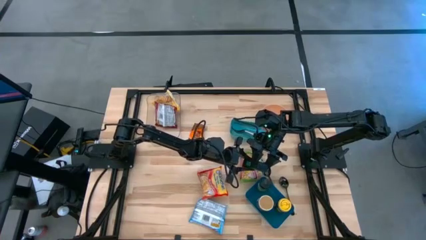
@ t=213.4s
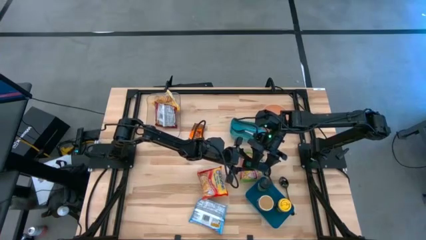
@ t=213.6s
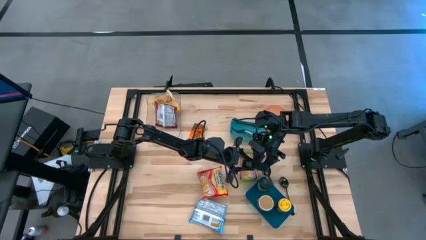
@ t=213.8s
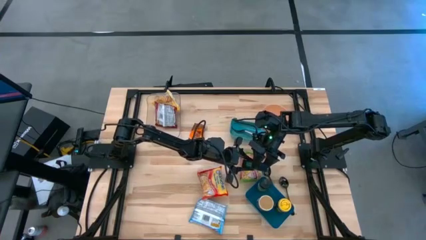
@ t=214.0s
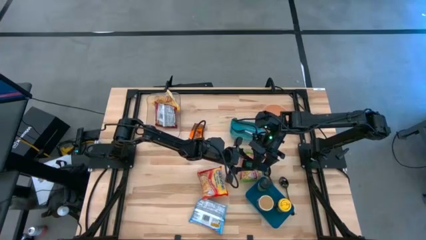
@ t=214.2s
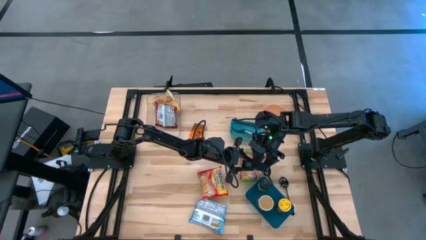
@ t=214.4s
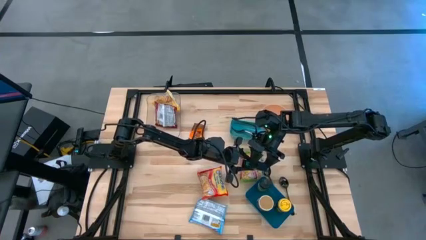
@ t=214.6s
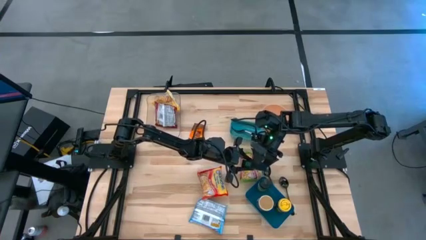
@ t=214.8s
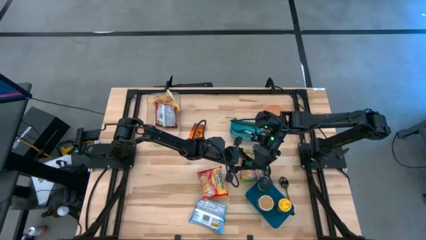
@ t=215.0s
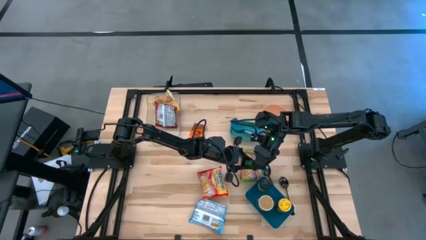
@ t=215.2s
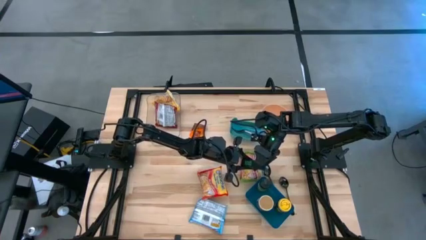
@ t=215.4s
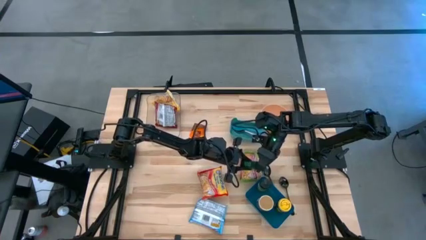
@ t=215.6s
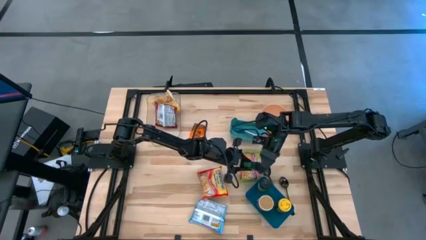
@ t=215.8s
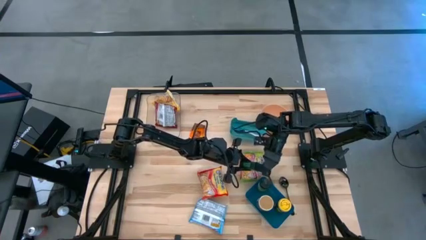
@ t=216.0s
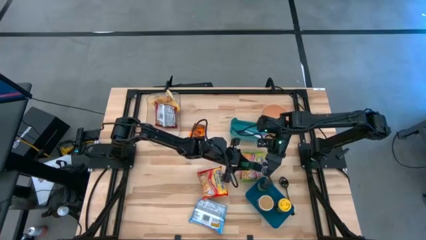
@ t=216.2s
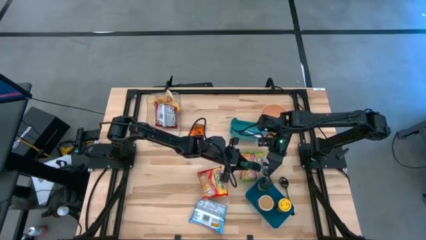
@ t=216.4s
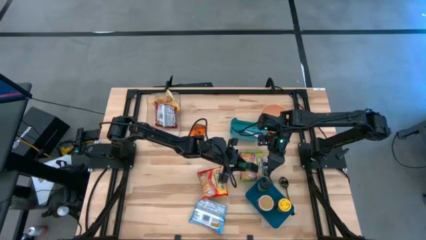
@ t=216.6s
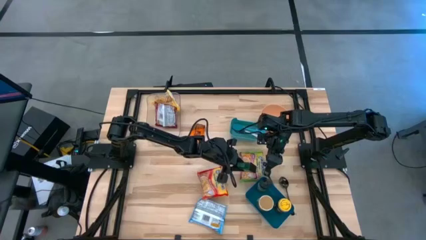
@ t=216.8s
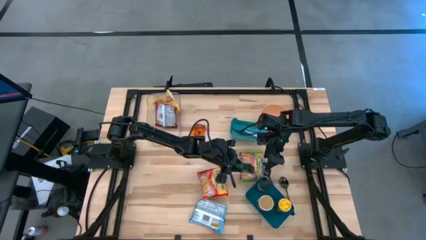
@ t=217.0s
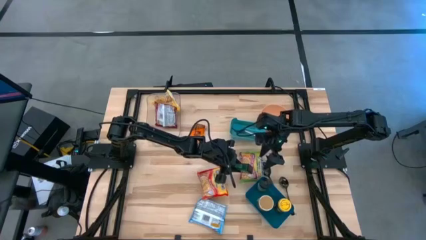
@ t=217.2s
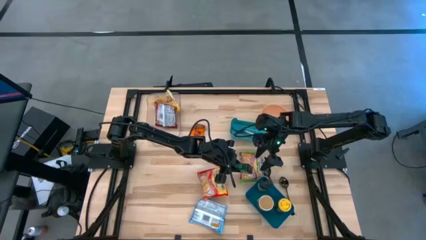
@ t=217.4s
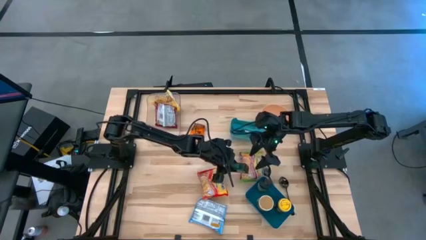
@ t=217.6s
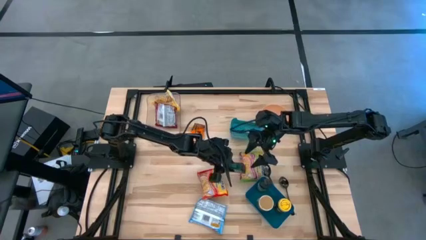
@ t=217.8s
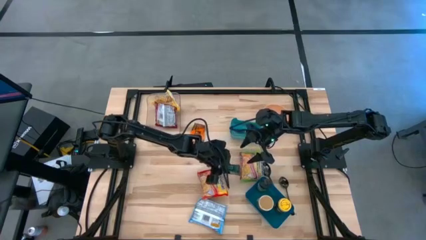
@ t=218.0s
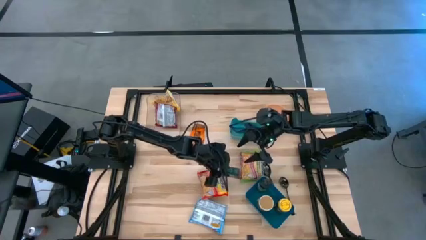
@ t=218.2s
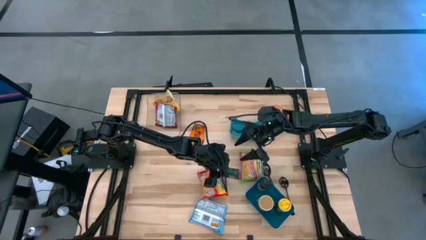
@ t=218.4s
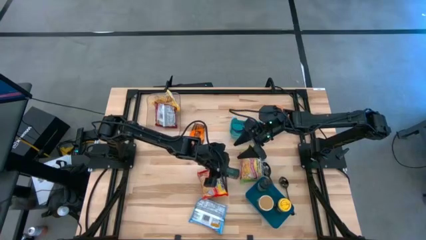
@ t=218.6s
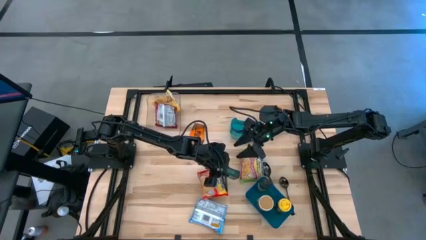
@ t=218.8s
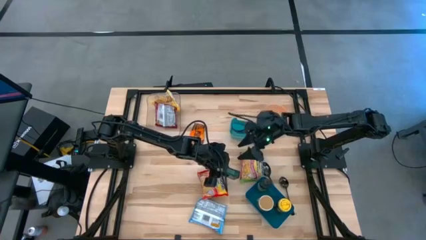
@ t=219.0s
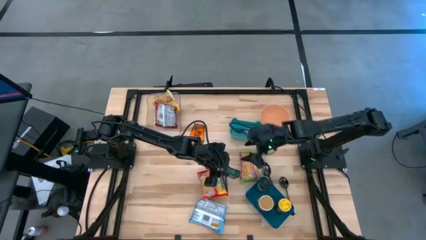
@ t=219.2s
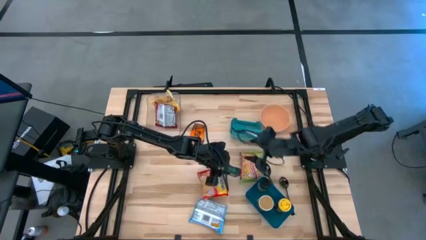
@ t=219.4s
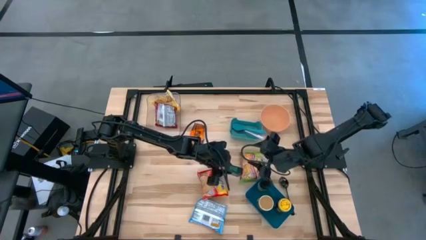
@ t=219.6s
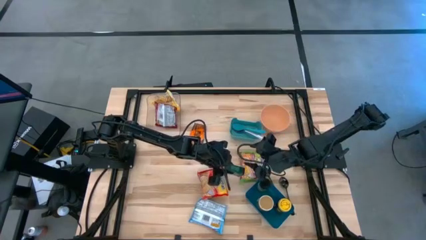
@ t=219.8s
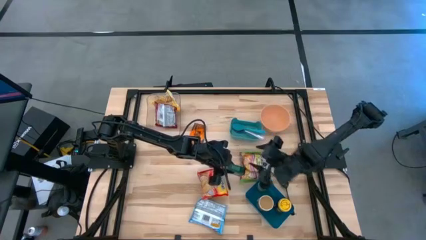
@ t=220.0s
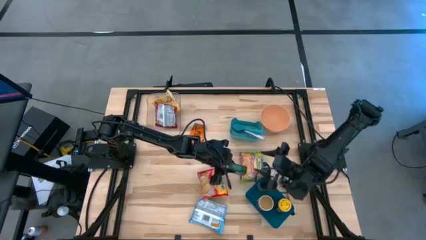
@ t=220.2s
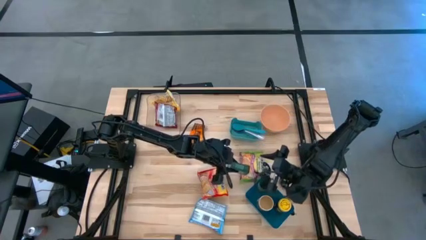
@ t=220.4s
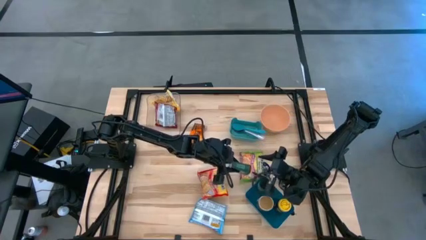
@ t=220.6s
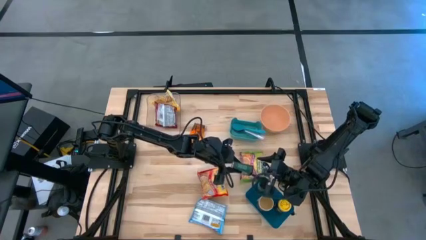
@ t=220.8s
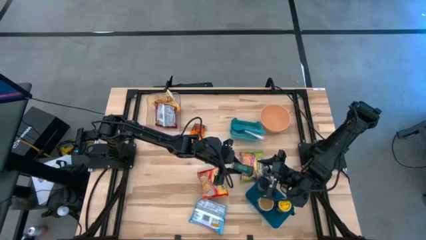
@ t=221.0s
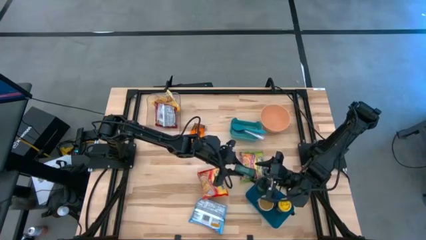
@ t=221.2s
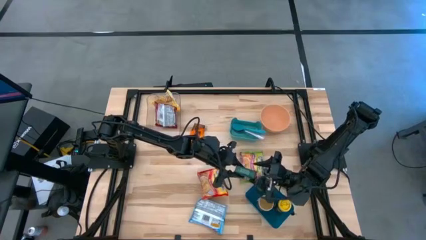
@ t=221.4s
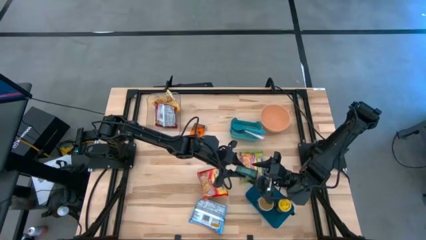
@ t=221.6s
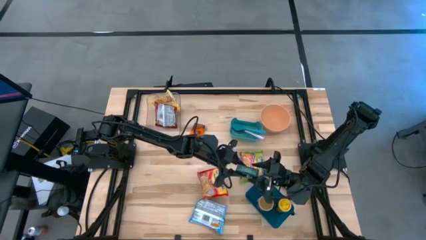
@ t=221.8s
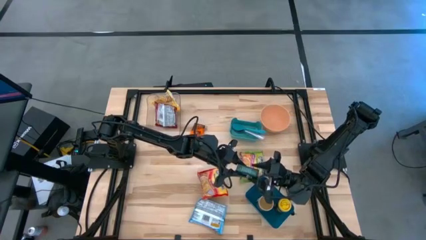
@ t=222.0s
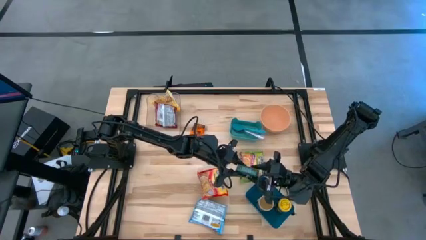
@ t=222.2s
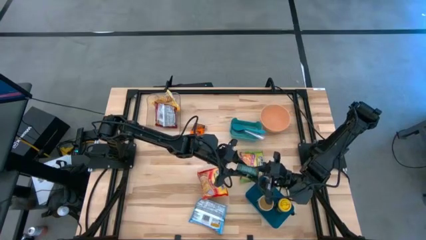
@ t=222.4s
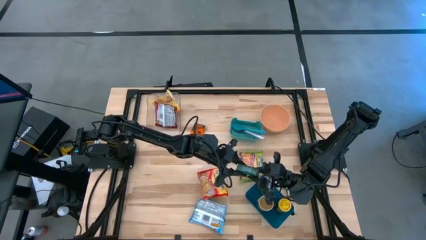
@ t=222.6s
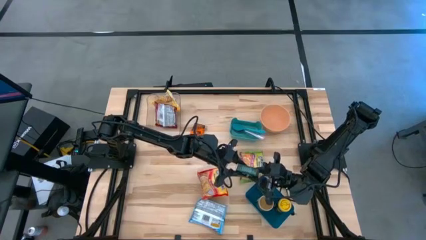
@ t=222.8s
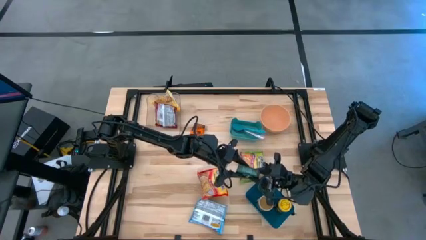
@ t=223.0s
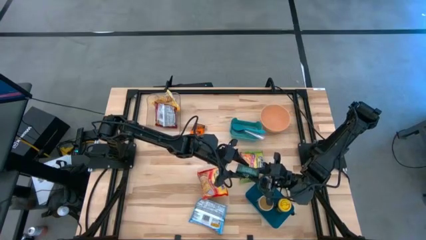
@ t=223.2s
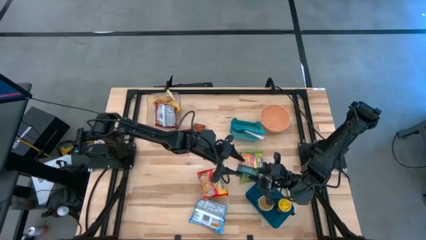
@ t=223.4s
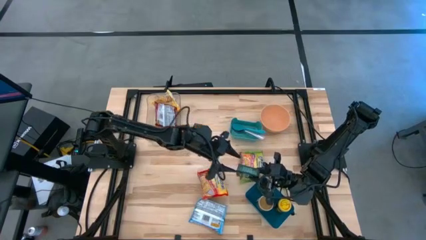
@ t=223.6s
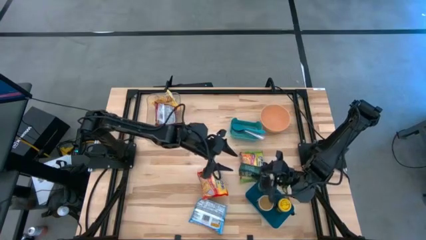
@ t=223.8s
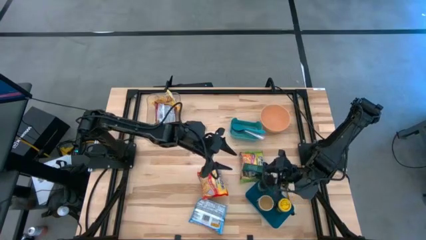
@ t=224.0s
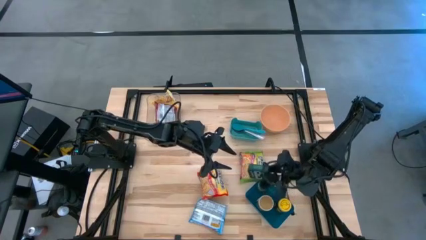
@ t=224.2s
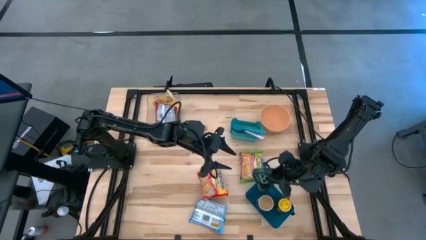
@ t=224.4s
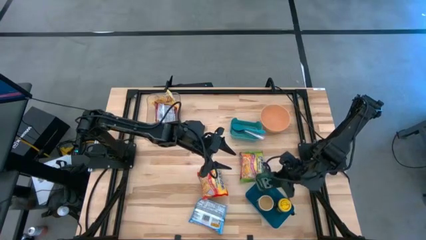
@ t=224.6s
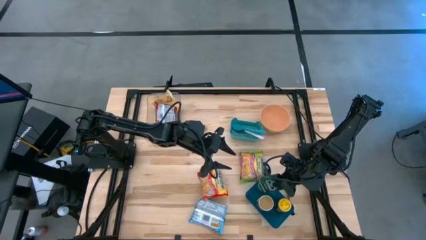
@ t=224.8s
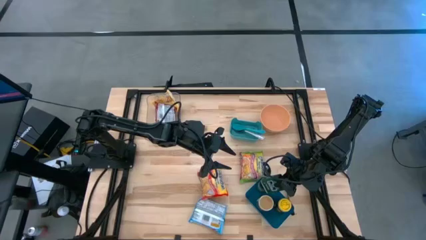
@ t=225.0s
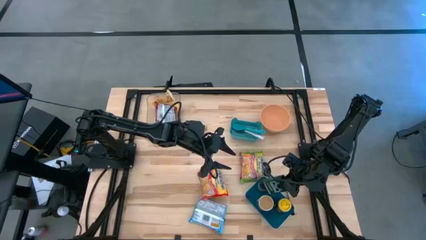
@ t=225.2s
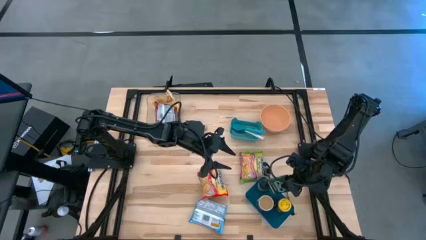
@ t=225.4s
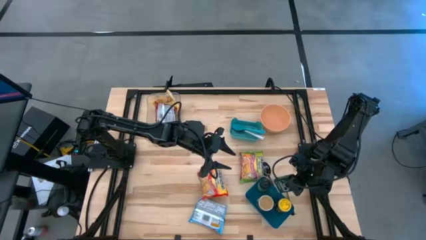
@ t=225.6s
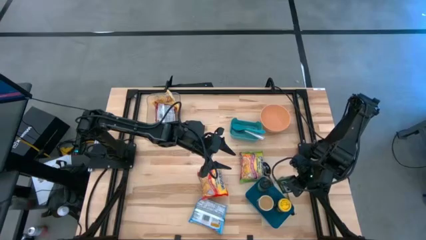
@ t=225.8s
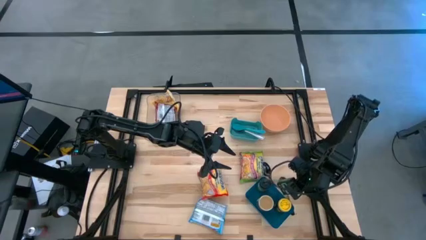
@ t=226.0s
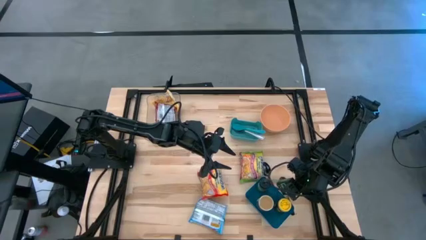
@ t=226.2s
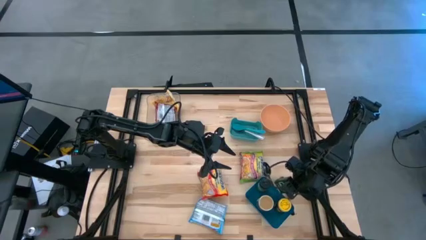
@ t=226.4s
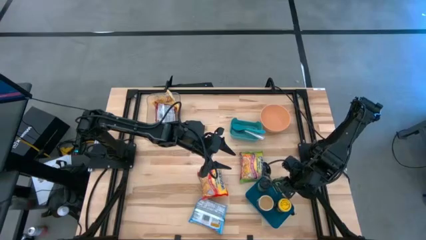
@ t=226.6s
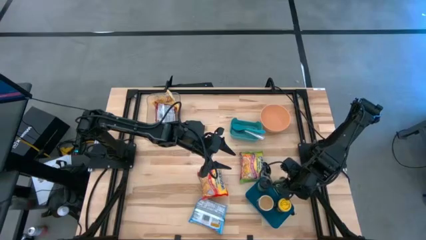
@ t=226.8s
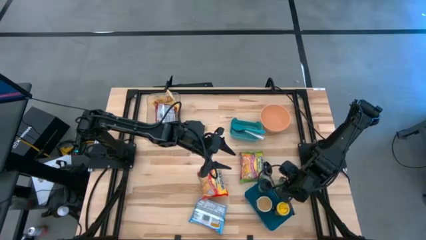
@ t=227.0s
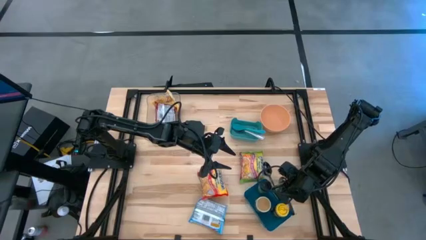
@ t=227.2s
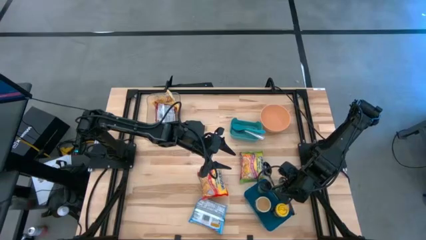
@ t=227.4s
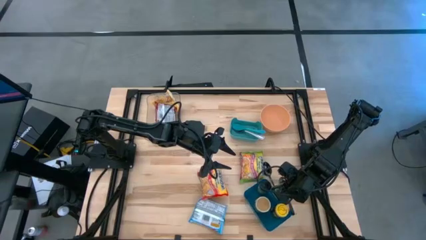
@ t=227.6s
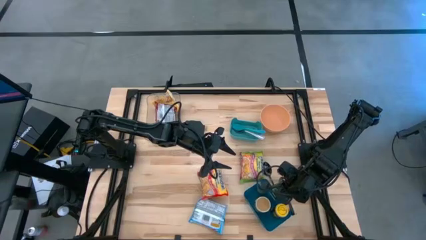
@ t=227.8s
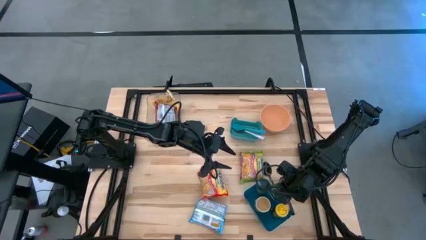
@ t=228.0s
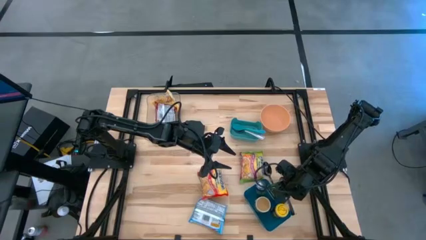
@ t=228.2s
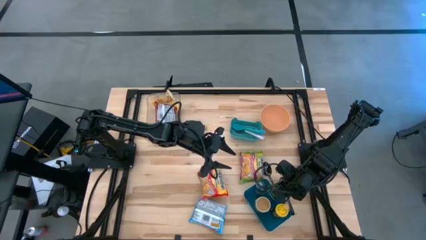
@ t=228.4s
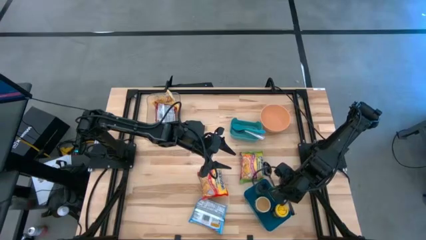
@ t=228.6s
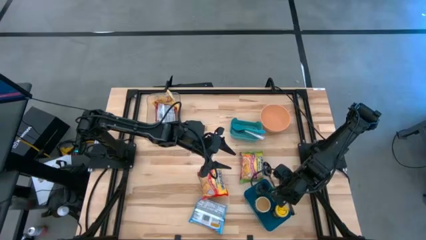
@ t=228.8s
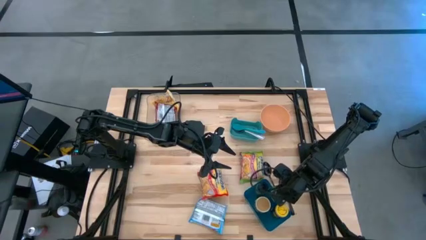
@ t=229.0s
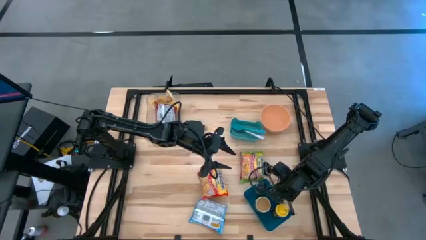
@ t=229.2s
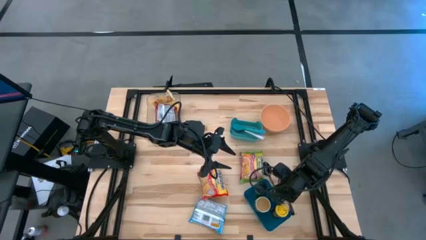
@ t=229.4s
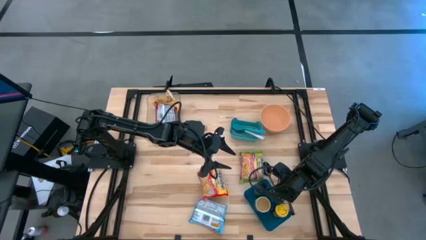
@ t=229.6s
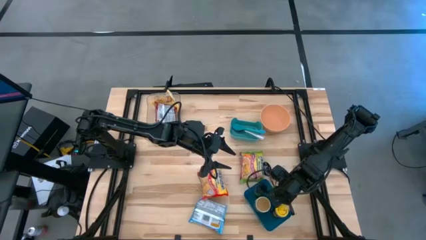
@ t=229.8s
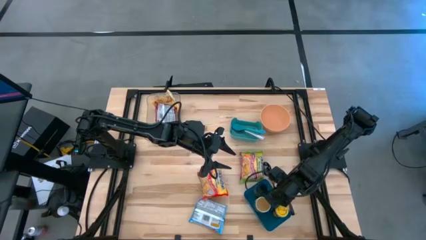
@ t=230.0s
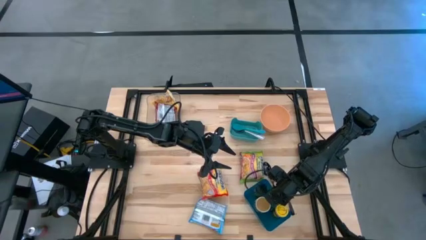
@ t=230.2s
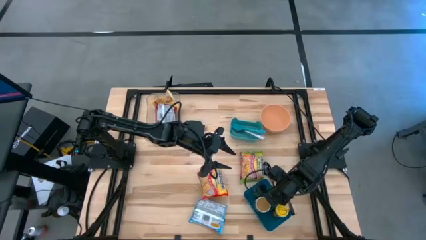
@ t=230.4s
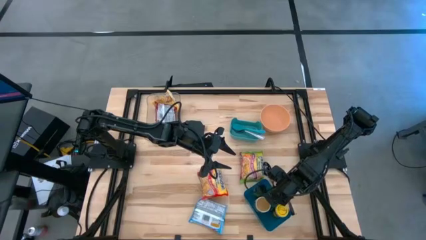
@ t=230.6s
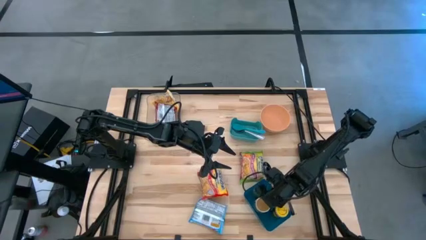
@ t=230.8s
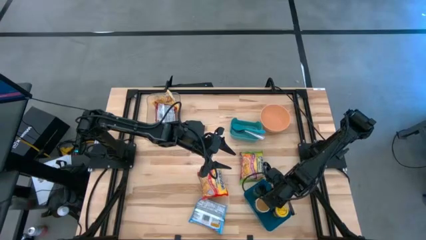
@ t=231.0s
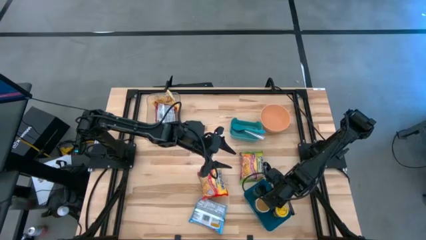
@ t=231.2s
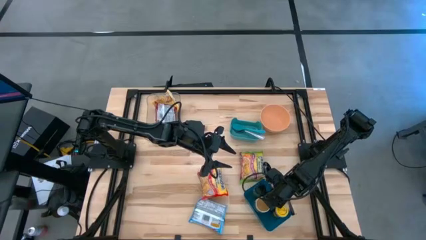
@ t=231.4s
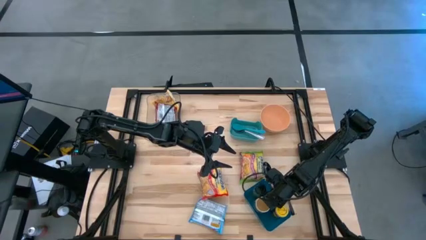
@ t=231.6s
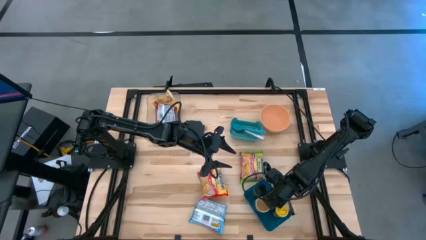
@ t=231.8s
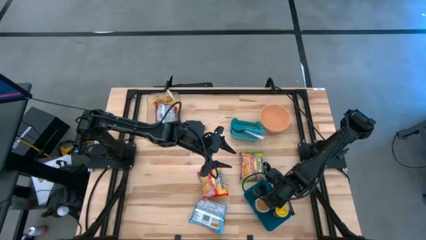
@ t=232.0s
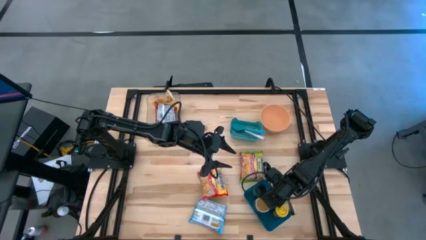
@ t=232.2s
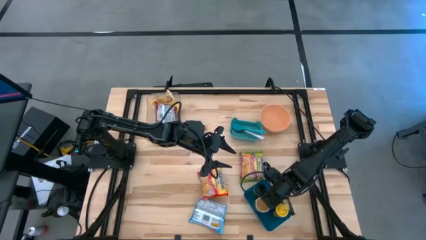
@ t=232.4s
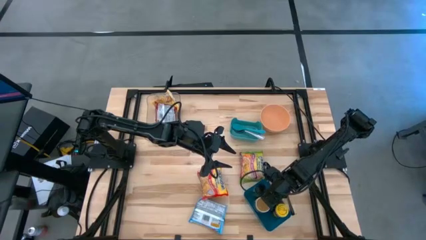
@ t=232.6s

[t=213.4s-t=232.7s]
Task: Pick & Place Food Item
Put the green seasoning can into the blue bin
